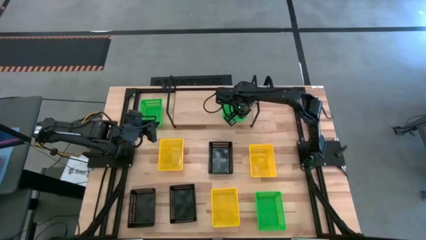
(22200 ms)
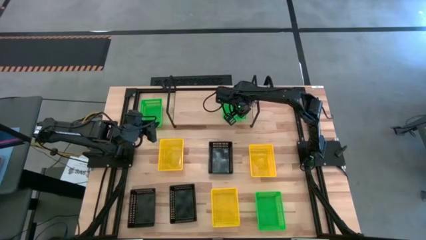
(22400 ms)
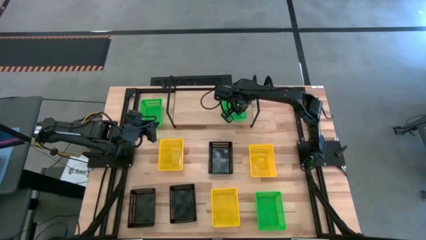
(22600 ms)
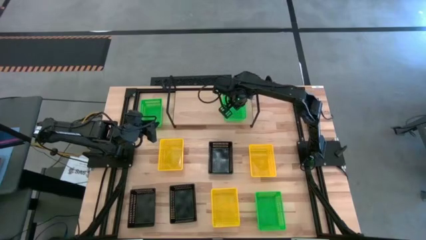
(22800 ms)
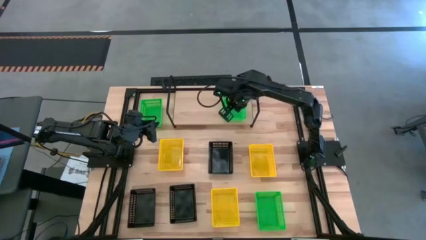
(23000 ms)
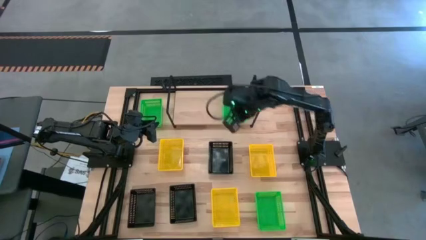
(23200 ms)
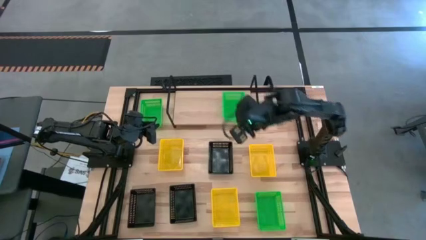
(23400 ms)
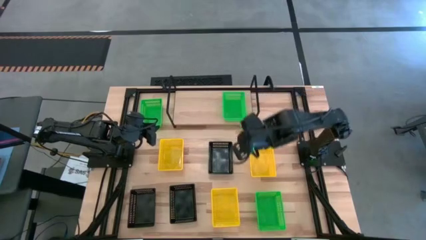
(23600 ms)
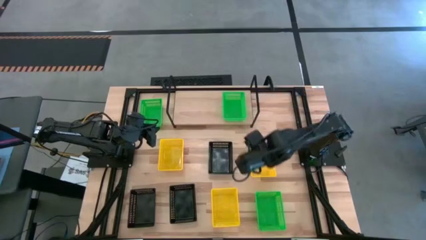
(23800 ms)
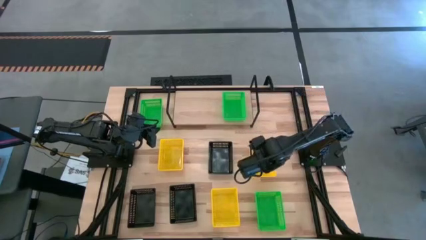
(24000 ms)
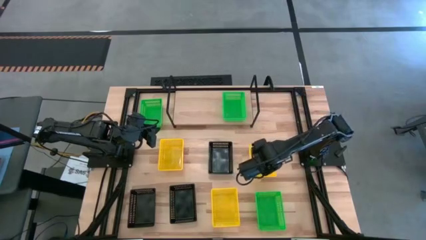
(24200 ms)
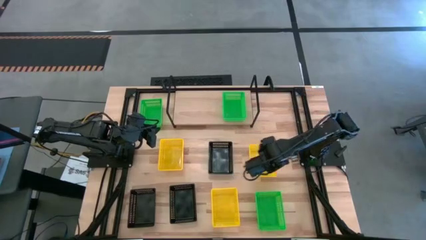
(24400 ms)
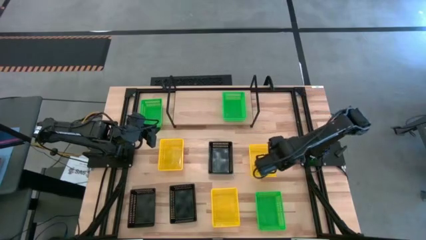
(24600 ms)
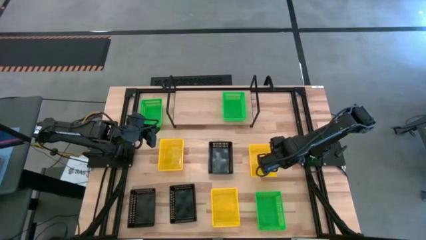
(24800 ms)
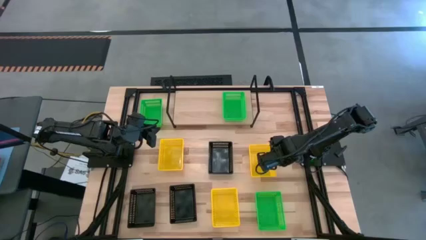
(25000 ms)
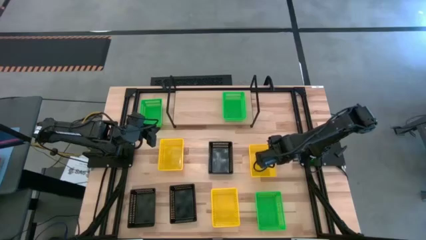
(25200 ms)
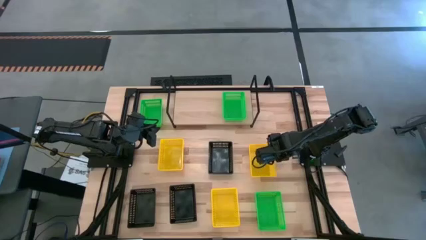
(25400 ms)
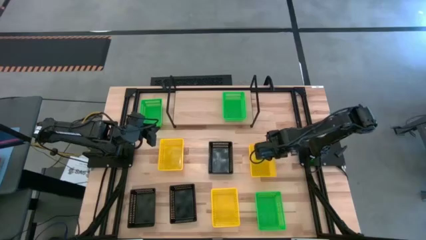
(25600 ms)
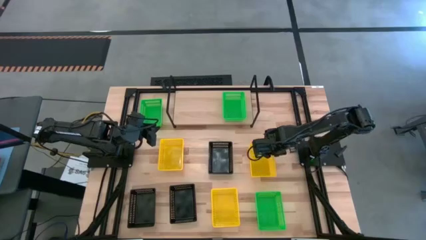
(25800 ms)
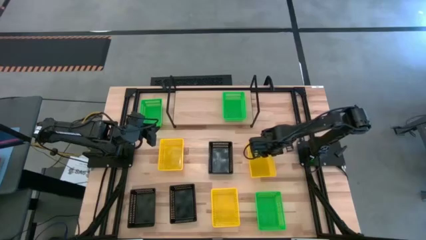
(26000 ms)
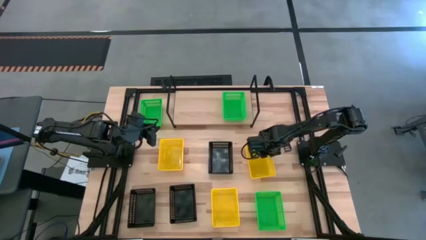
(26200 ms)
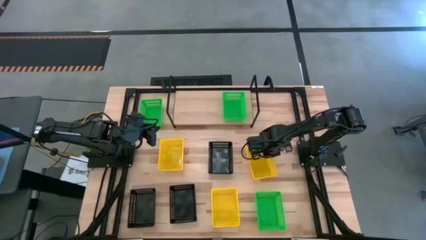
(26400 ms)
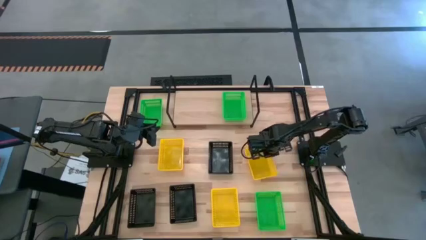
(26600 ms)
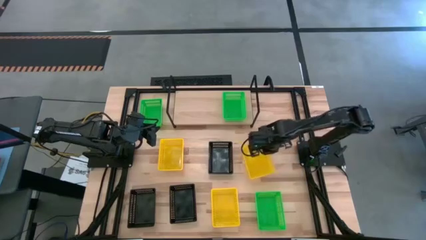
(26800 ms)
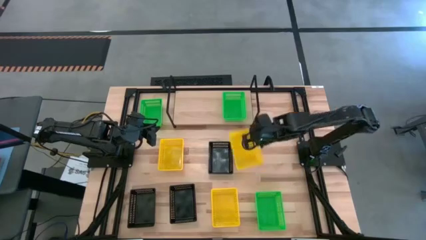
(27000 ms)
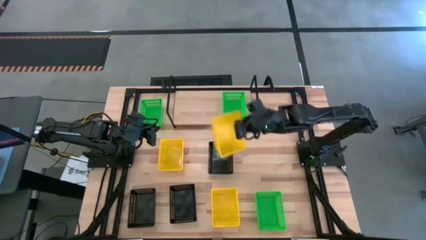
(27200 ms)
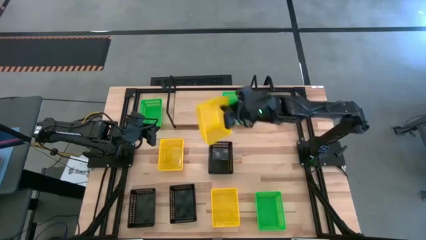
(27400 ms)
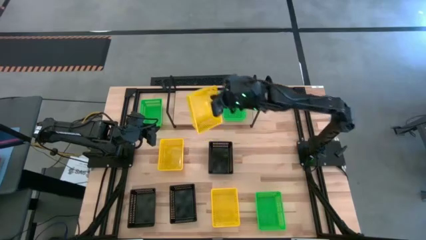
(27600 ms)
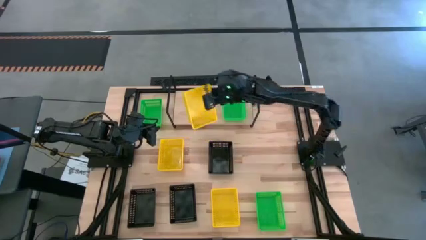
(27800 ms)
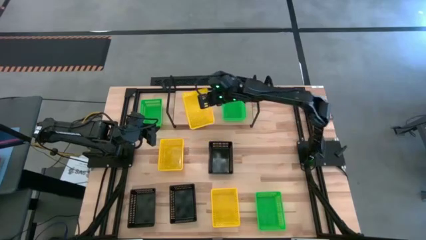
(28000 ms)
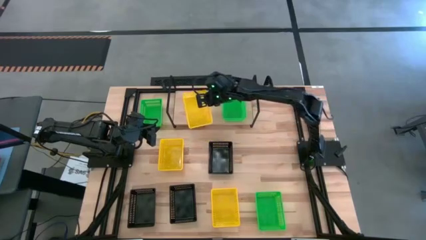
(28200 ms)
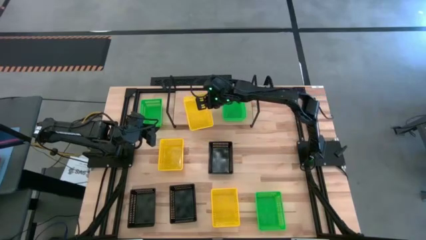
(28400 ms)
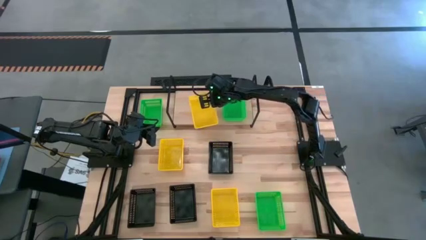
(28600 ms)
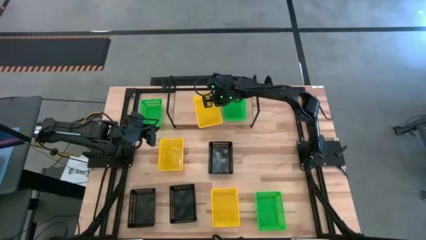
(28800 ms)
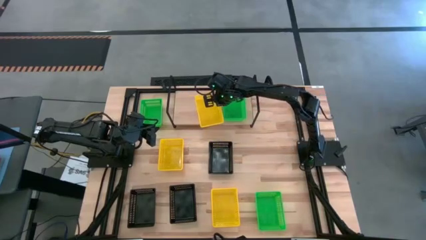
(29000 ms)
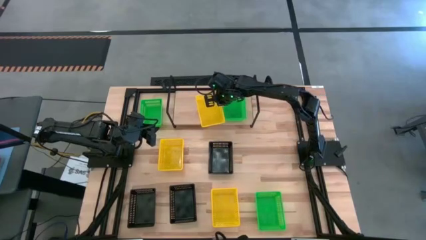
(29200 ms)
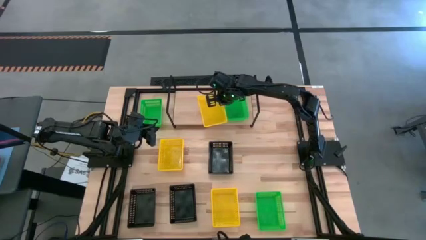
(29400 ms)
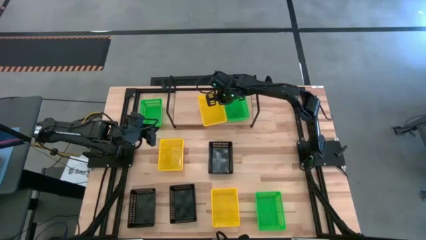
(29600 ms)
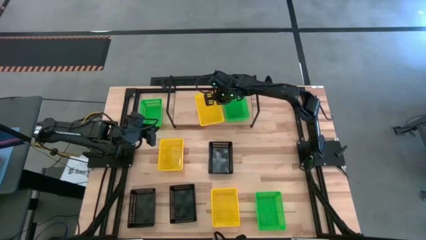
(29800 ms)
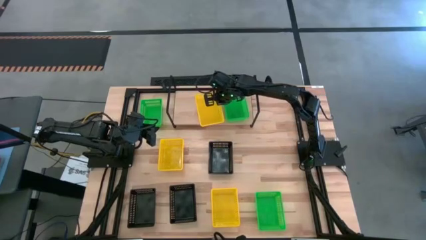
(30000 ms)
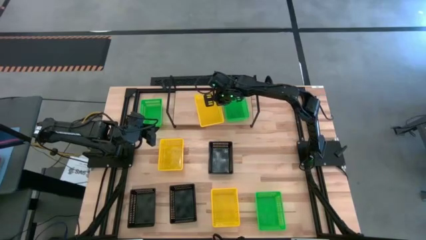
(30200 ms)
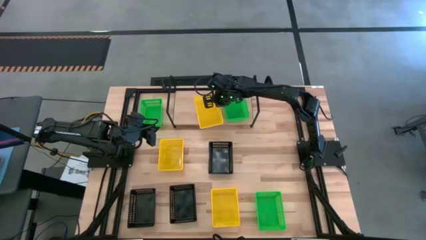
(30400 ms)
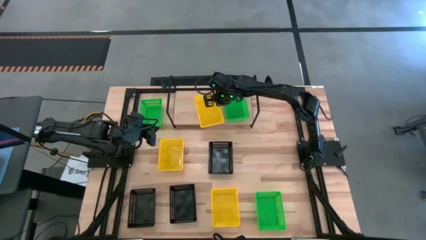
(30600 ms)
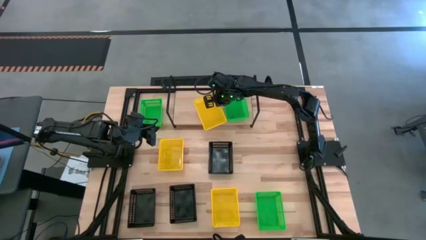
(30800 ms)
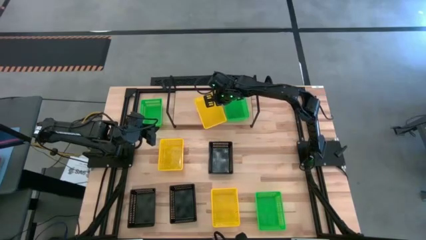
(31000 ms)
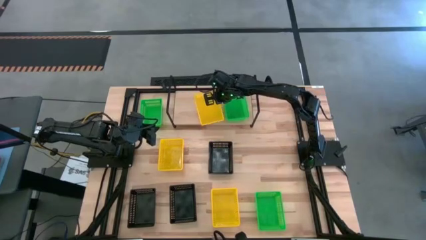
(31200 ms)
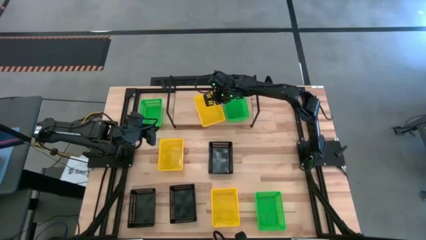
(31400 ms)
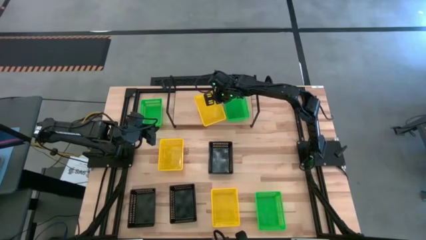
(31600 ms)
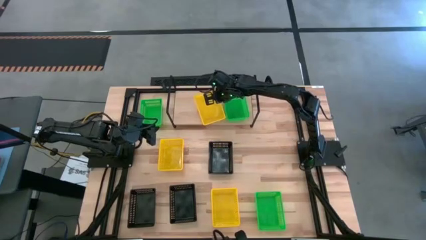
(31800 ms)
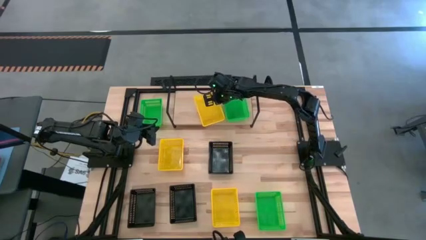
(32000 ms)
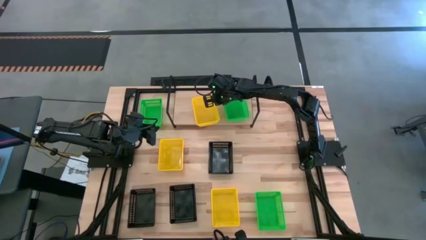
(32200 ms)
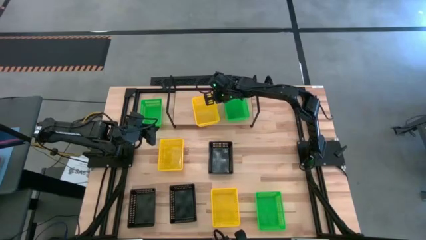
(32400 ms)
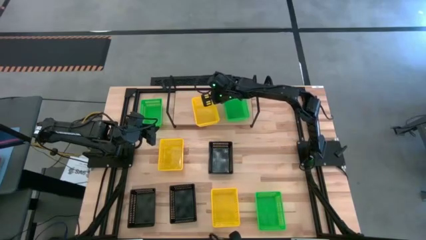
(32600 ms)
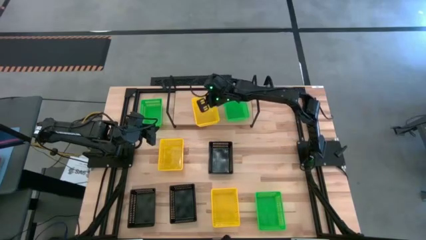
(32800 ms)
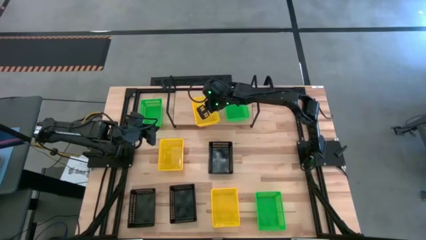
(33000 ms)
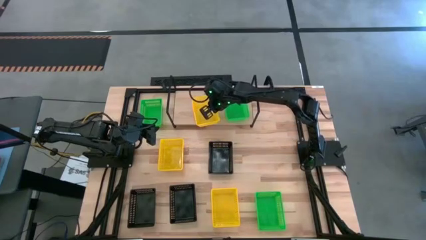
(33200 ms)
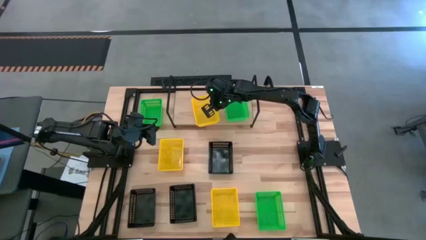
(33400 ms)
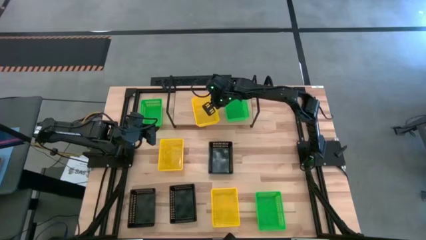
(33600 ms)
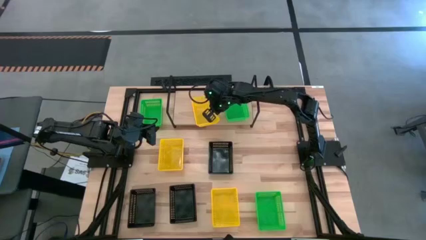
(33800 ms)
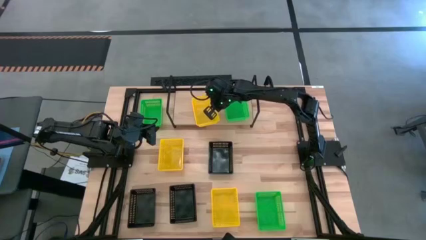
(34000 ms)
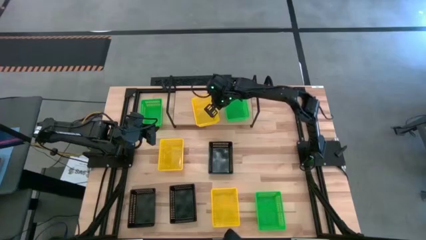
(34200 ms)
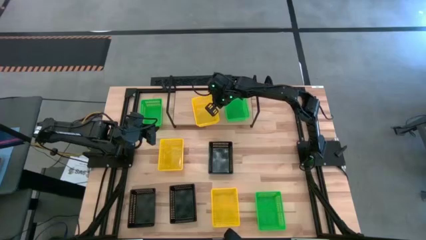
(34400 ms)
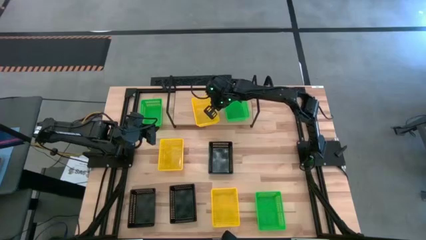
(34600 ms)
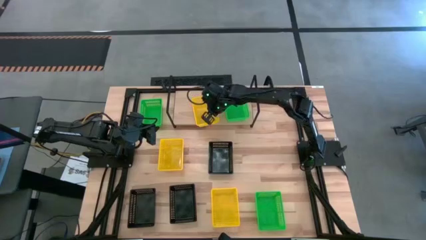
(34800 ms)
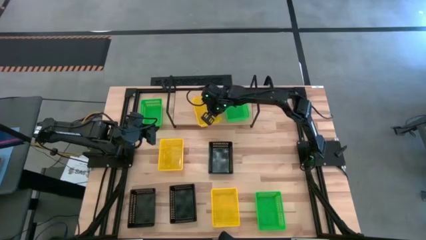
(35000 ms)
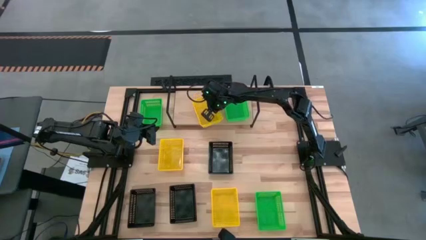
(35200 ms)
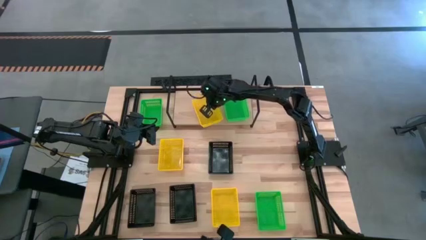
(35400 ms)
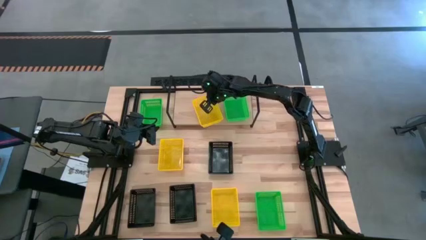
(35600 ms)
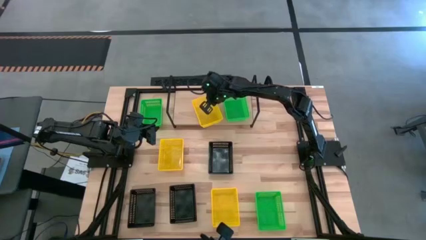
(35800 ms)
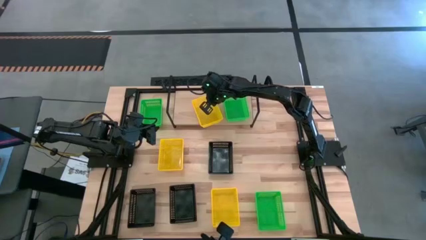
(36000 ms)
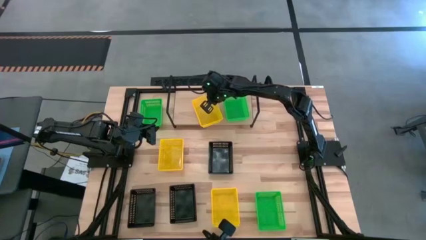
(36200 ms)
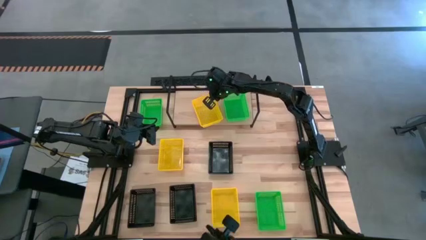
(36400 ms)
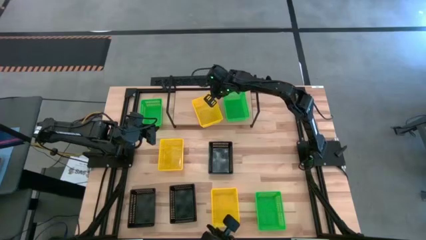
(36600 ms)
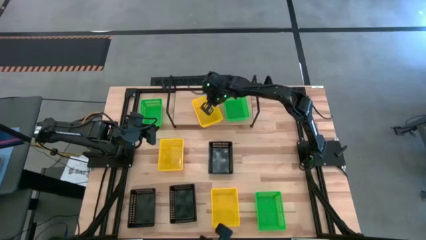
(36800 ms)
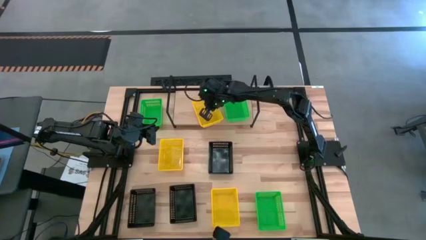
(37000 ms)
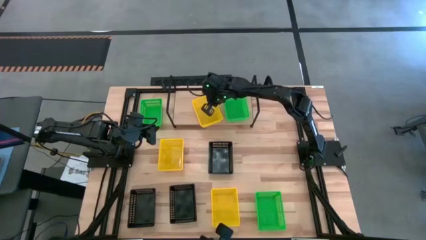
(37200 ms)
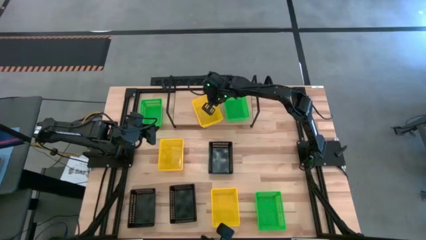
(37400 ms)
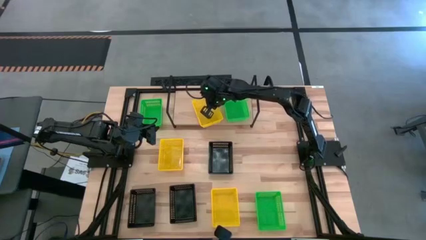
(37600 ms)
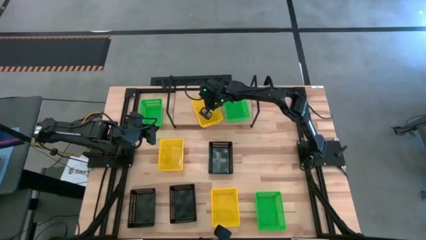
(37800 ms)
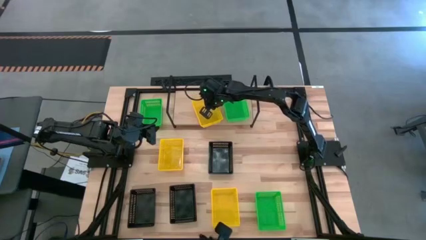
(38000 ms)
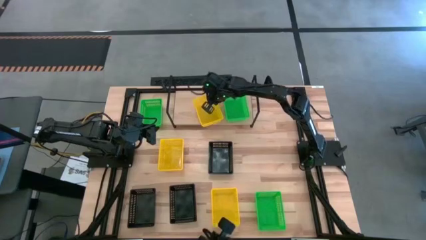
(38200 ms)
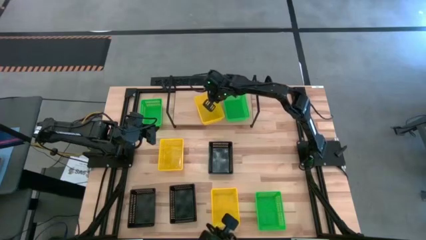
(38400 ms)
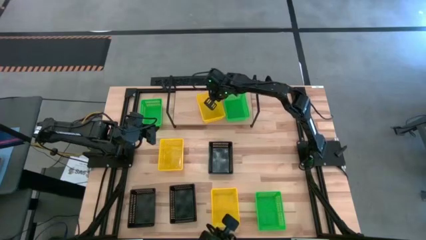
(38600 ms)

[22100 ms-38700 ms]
Task: Stack baskets on shelf by color
Put the top right yellow bin on the shelf
